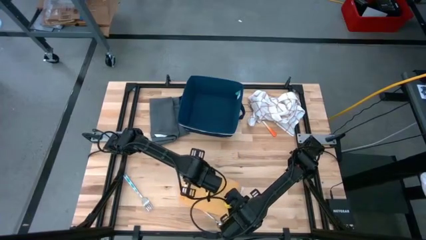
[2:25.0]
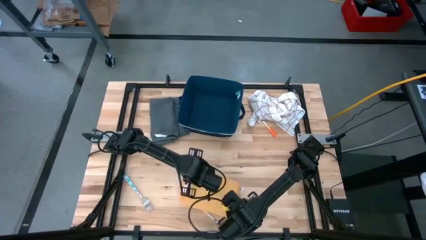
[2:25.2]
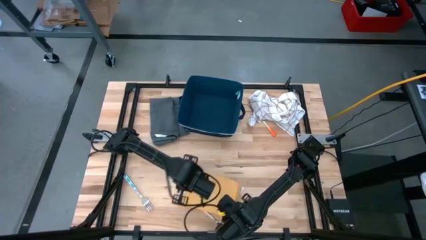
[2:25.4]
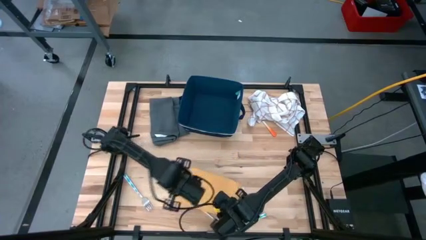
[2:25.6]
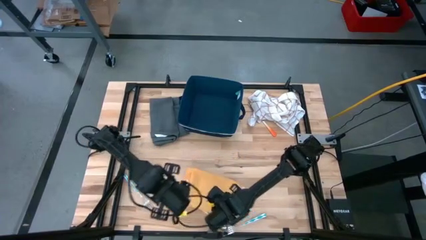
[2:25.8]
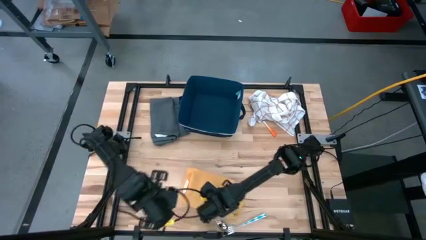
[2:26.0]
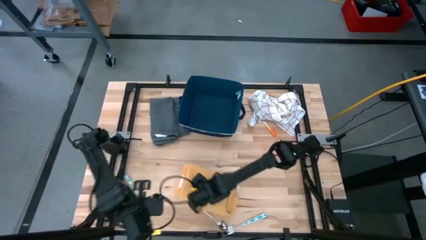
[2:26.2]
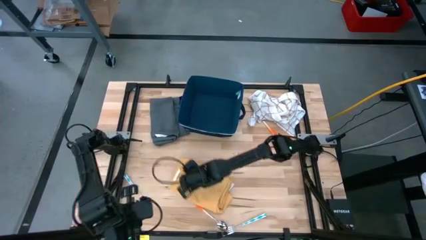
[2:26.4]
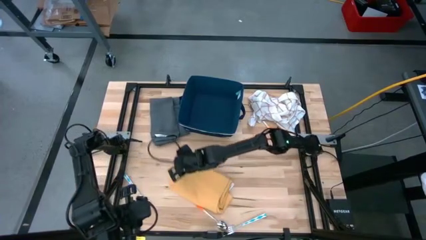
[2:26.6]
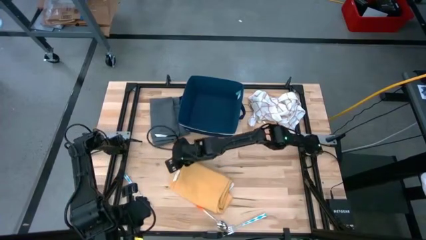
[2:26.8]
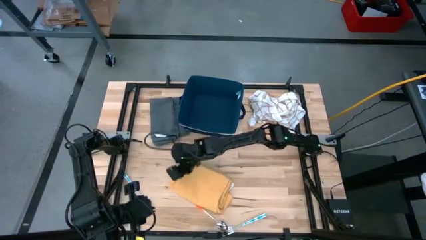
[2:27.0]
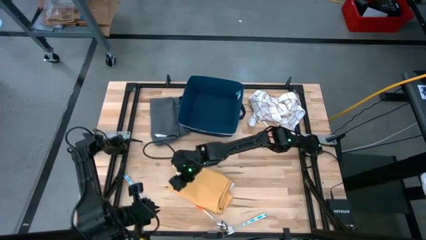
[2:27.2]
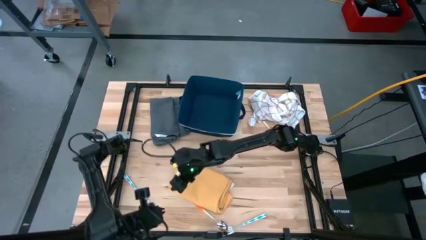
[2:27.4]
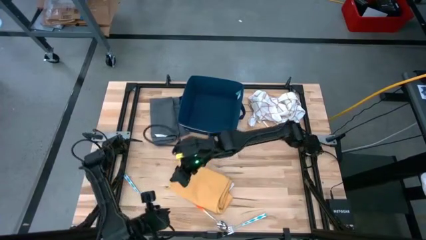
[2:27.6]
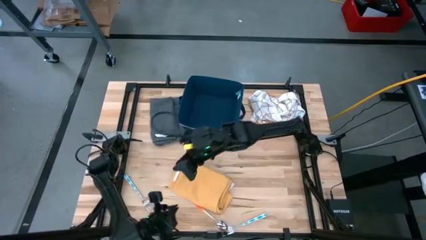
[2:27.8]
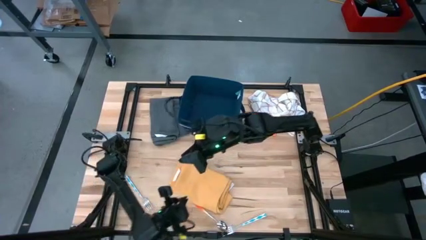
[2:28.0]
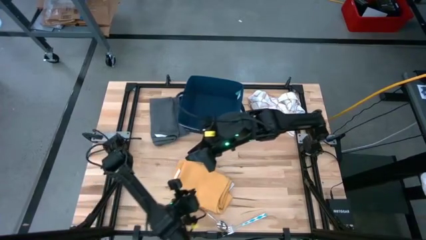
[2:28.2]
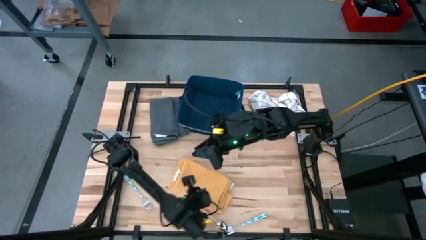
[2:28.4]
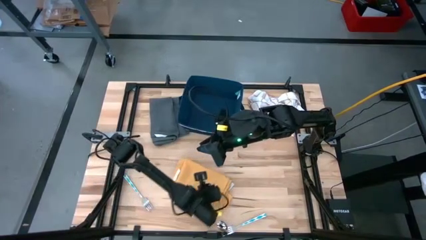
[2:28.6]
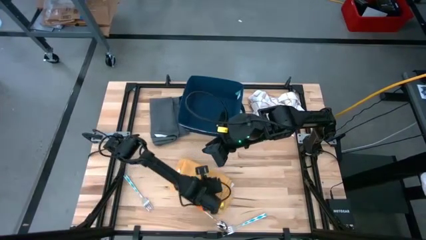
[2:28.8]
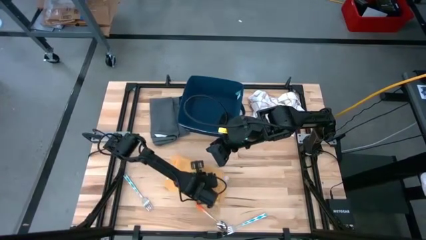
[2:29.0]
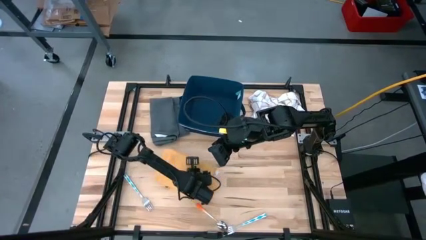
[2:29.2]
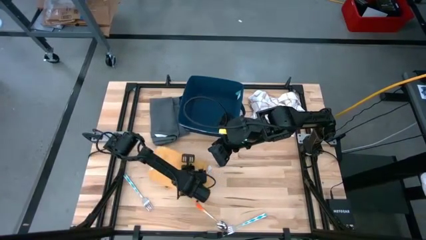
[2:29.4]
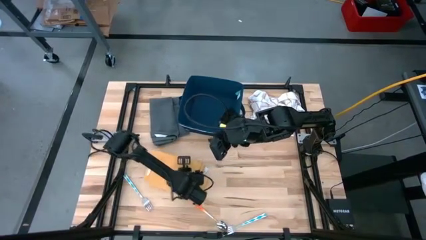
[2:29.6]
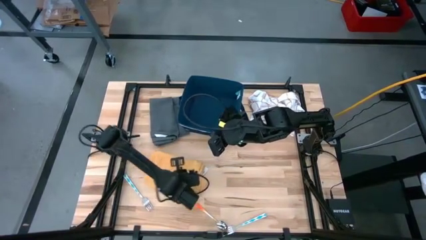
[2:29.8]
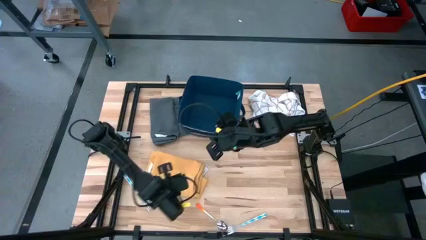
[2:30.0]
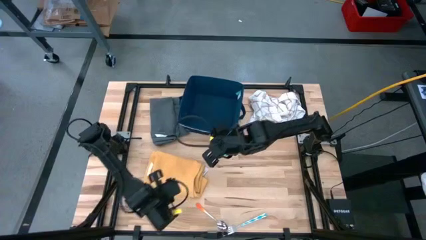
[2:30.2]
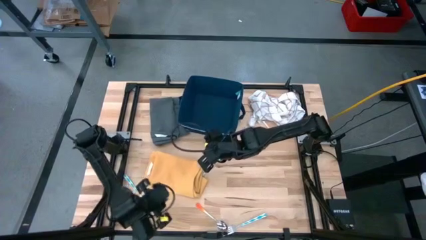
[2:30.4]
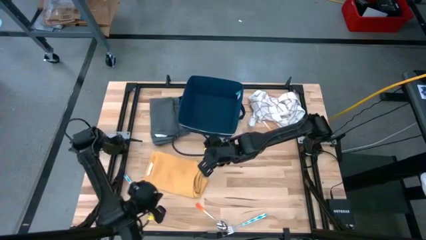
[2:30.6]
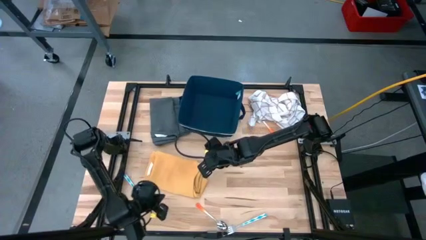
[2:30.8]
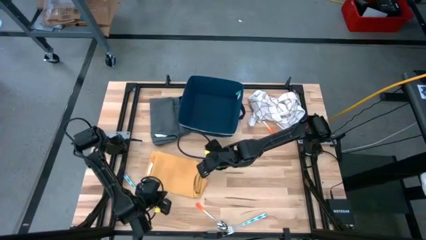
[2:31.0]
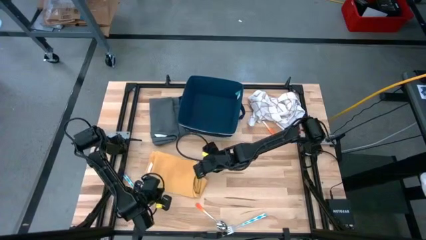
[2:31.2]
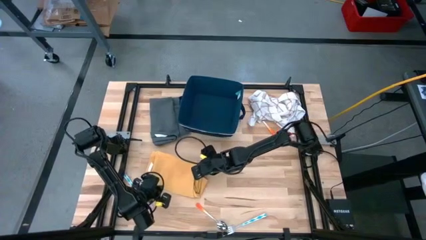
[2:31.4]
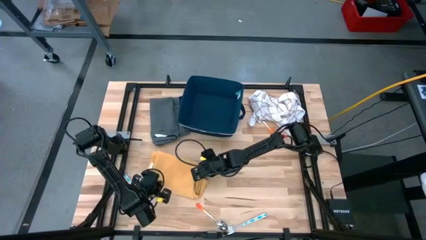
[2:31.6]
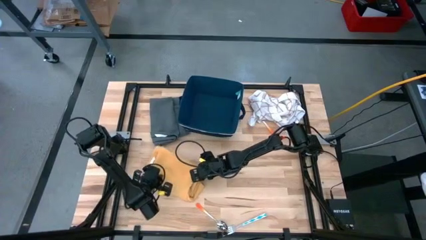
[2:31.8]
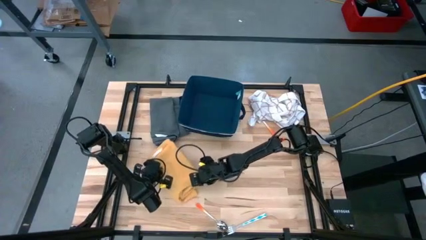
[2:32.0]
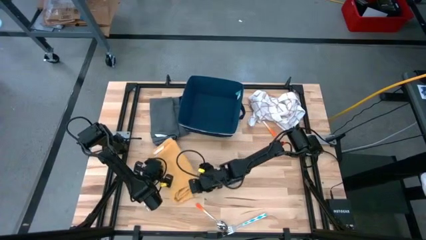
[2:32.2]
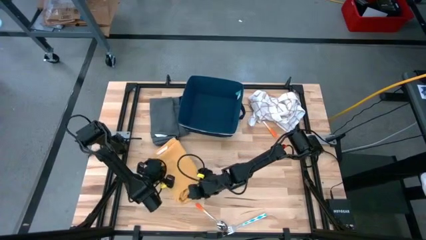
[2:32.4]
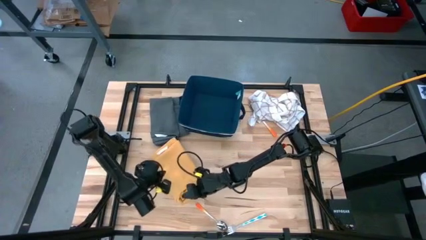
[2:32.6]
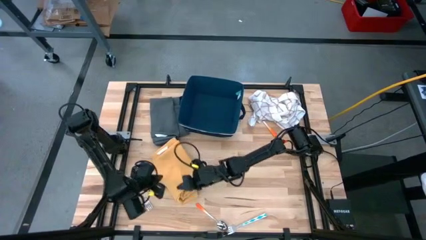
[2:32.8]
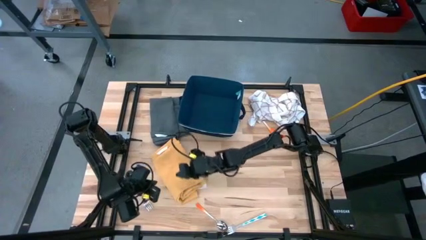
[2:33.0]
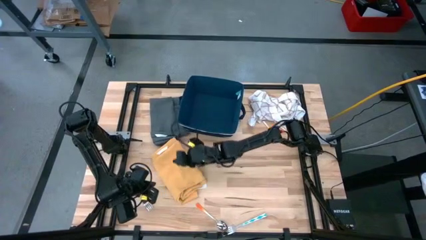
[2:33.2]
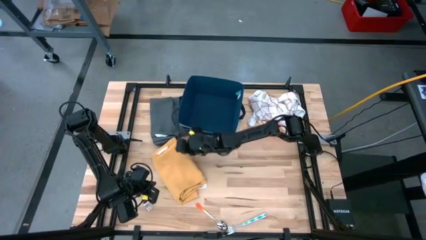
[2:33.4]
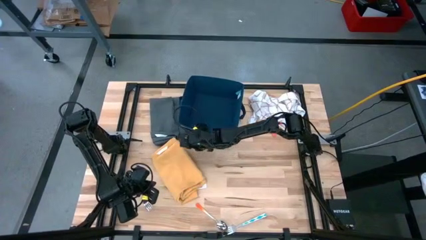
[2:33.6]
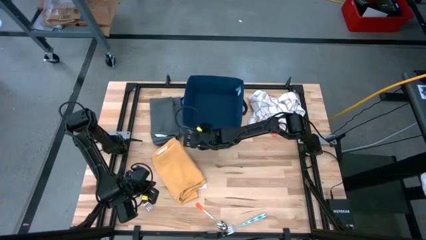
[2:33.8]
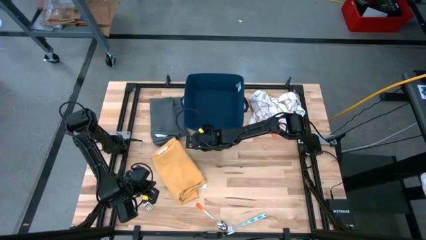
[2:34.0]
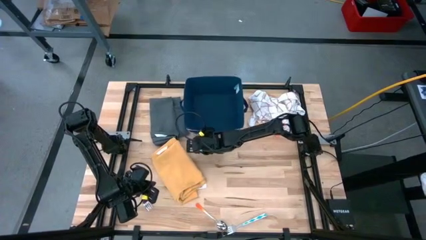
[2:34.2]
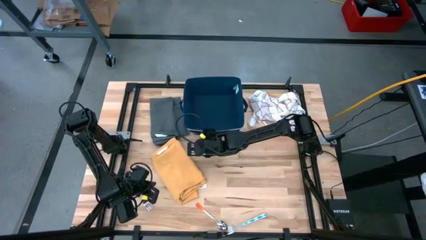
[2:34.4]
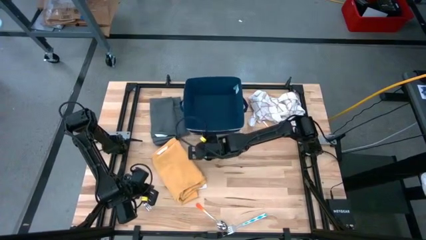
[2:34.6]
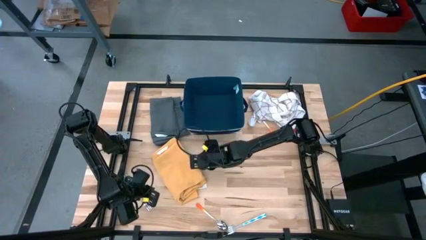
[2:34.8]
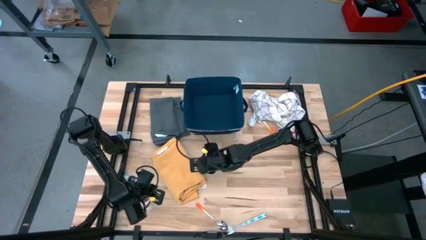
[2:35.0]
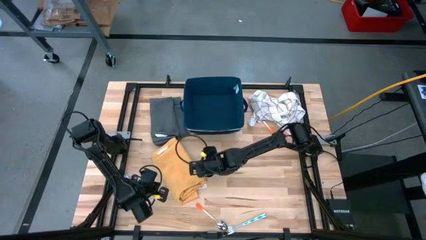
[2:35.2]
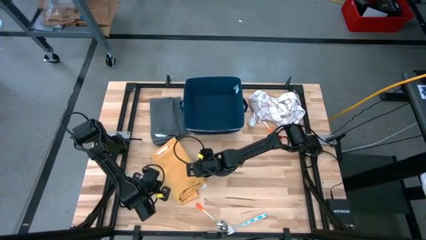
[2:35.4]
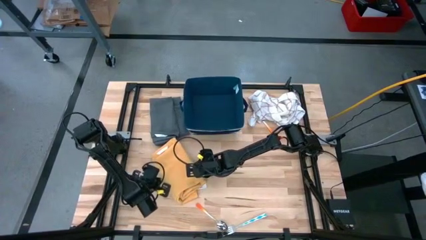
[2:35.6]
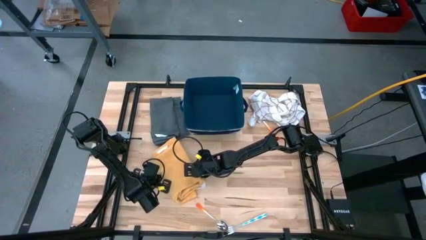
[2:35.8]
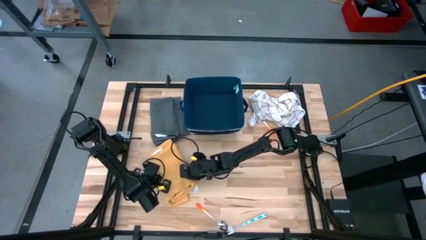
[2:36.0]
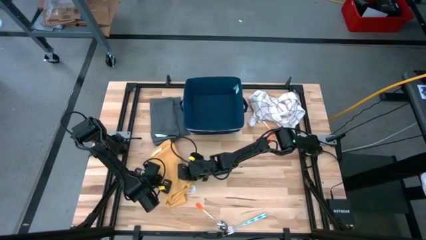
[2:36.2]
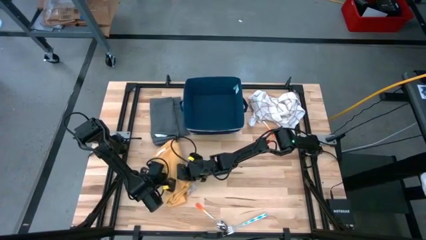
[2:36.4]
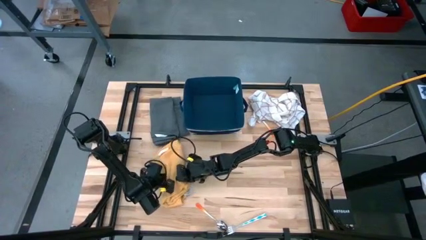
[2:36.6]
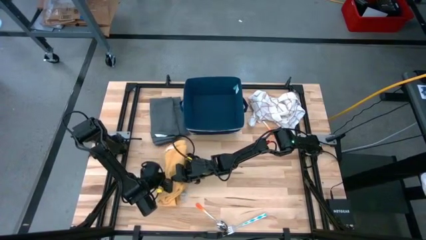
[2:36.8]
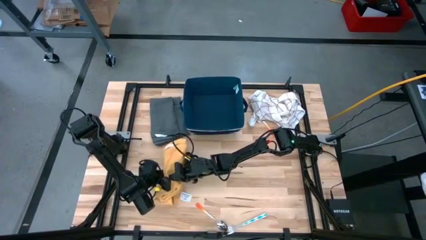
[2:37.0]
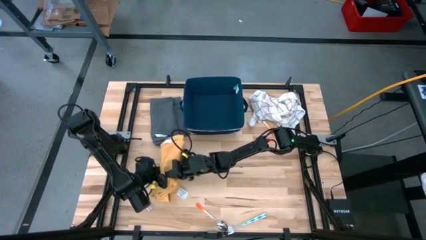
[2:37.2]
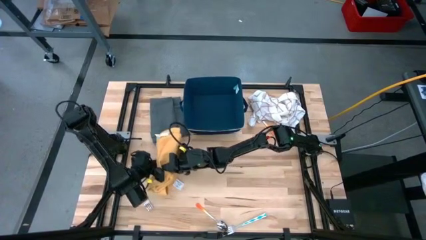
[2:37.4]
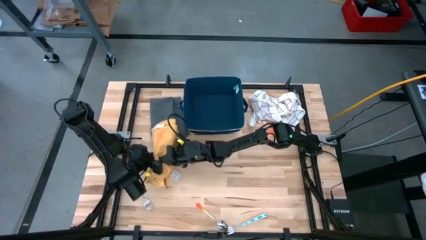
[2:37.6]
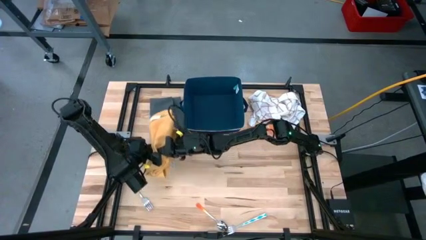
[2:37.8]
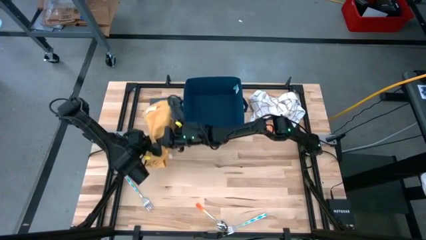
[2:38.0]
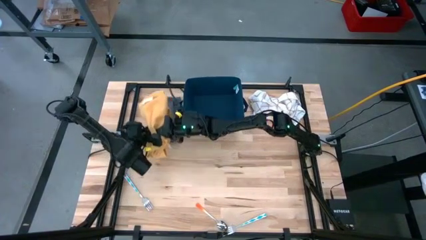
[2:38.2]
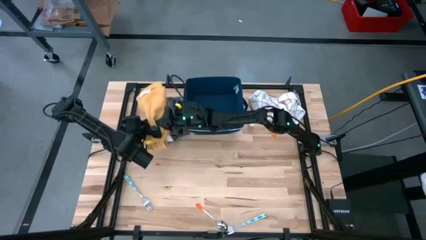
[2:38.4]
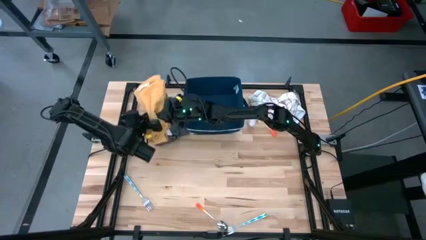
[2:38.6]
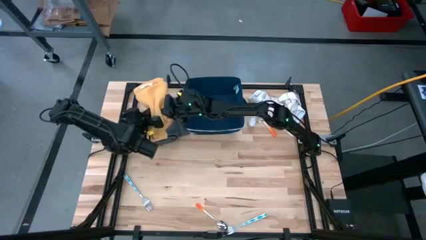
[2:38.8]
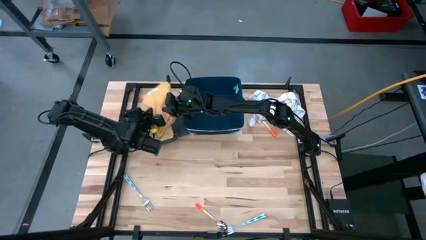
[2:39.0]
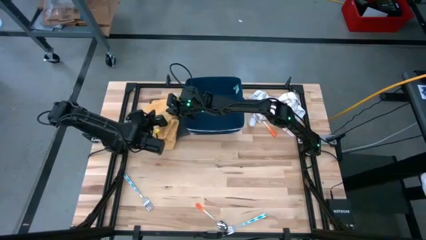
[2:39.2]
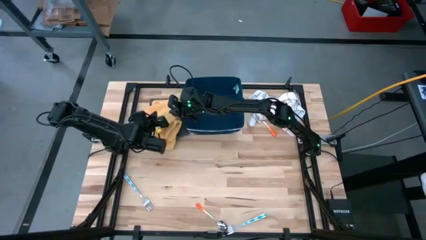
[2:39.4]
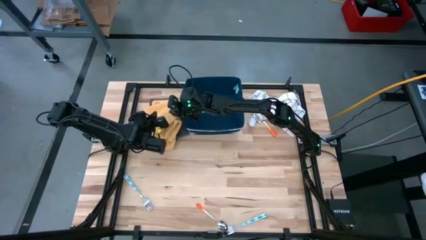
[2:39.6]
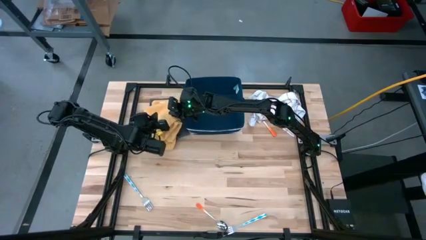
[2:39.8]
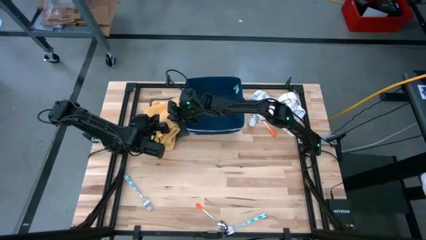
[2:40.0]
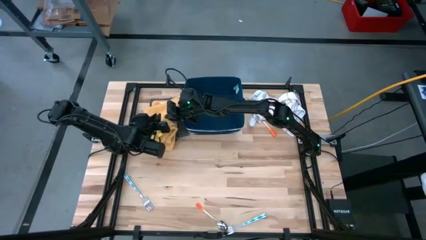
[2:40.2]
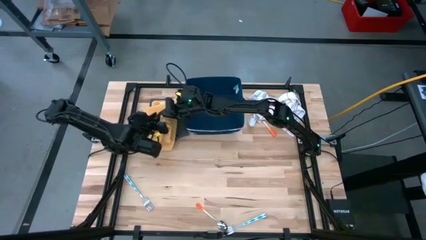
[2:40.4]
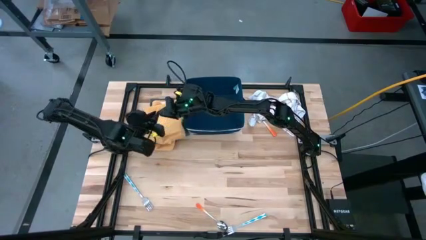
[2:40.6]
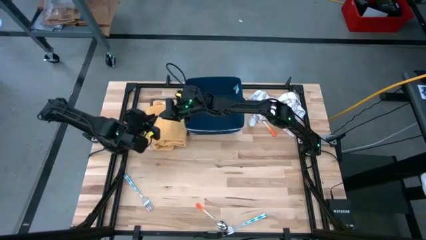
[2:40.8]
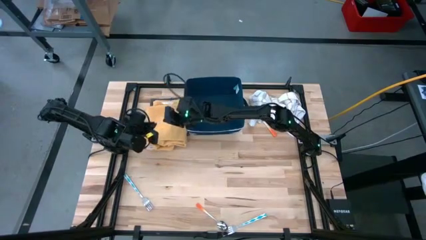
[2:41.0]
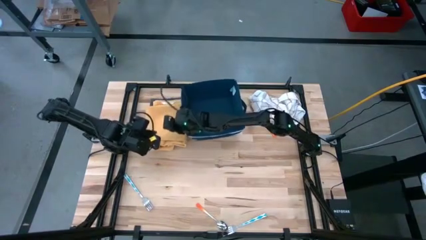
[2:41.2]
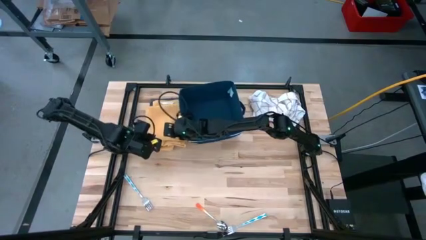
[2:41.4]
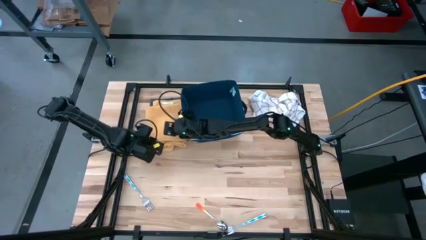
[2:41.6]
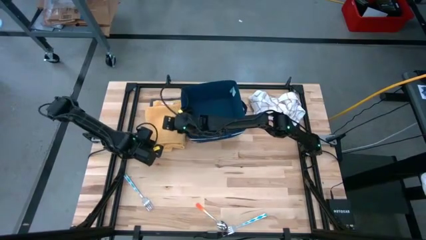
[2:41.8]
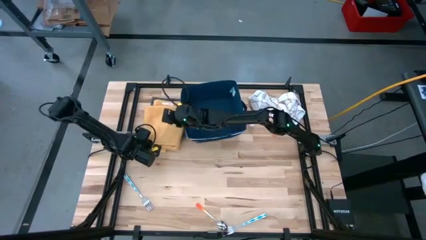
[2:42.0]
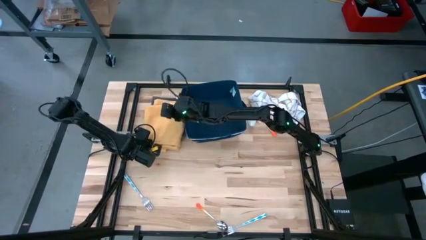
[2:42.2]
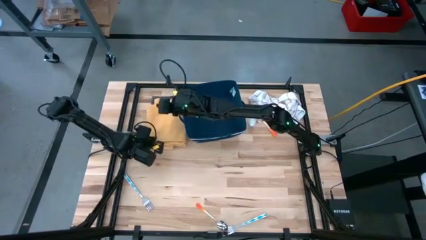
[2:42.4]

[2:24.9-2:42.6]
Task: Fold towel
Stack the yellow towel on the gray towel
